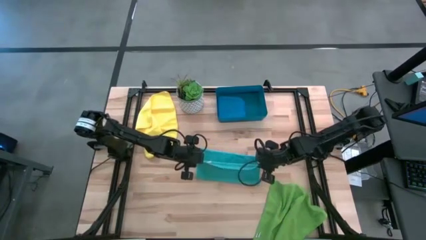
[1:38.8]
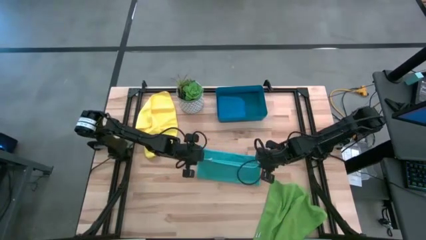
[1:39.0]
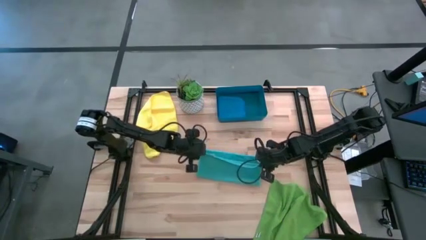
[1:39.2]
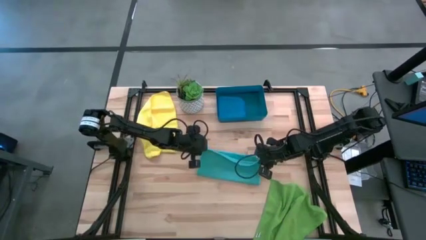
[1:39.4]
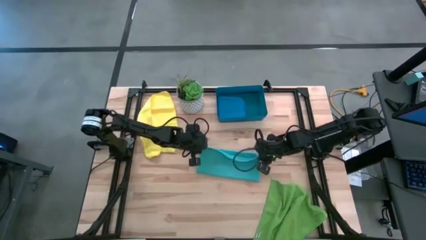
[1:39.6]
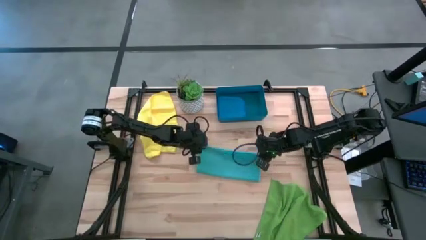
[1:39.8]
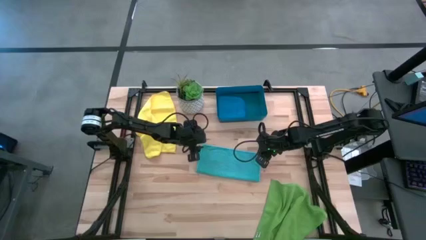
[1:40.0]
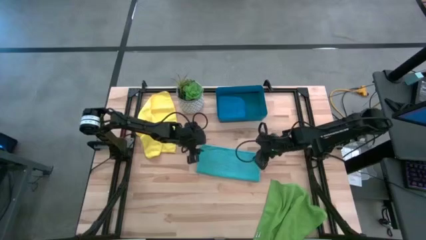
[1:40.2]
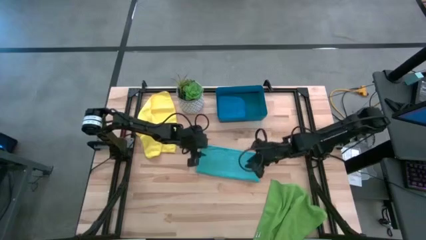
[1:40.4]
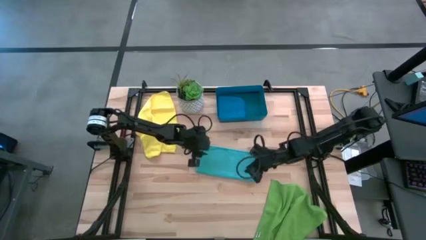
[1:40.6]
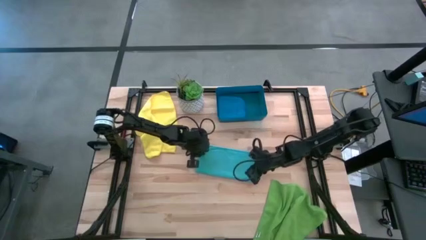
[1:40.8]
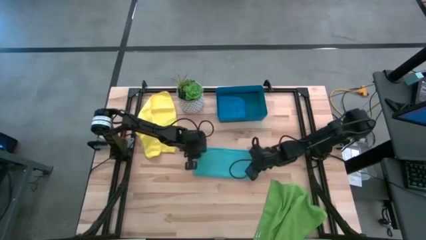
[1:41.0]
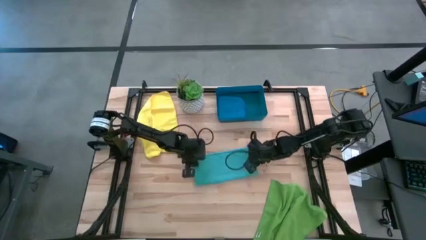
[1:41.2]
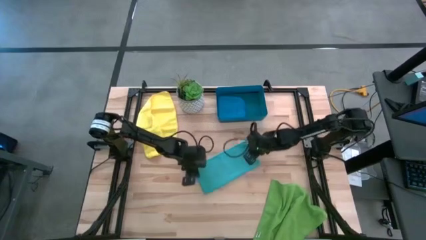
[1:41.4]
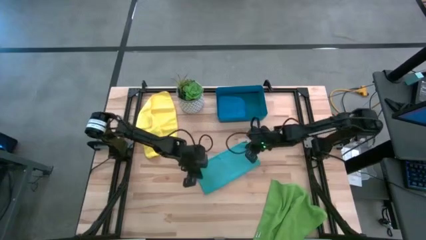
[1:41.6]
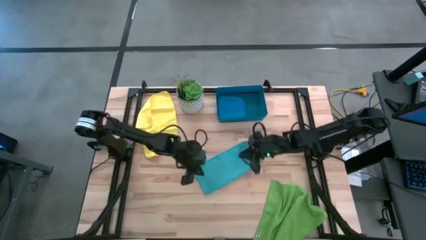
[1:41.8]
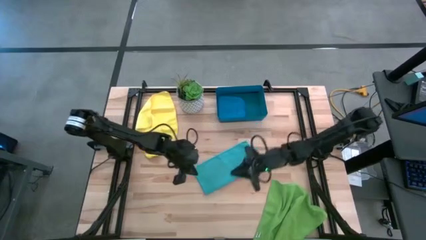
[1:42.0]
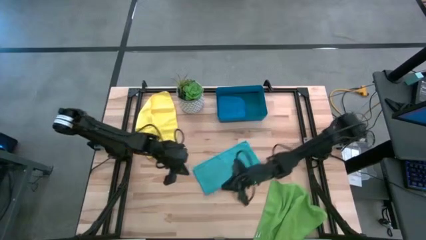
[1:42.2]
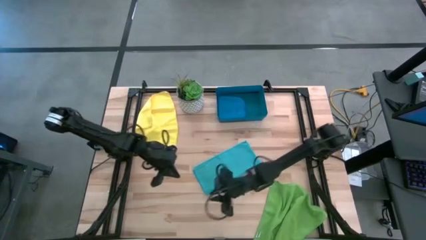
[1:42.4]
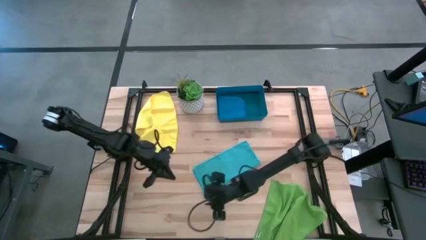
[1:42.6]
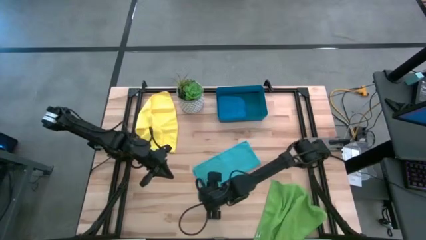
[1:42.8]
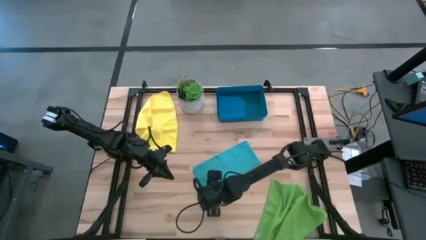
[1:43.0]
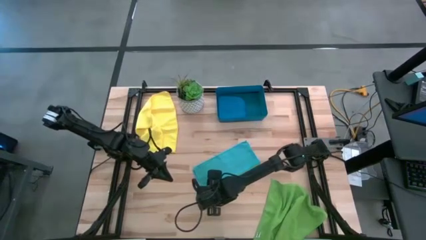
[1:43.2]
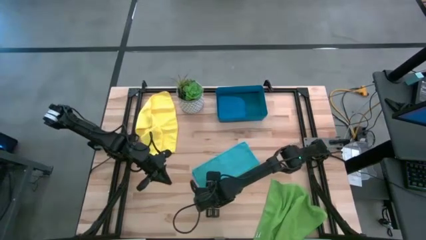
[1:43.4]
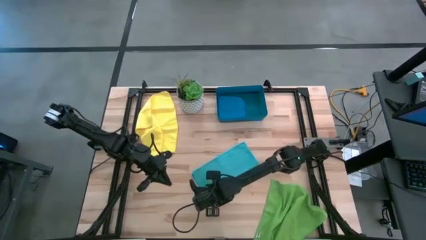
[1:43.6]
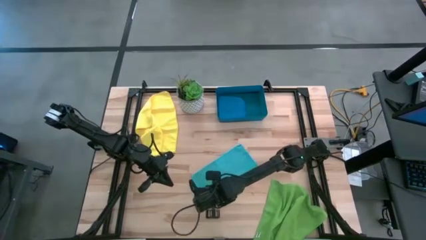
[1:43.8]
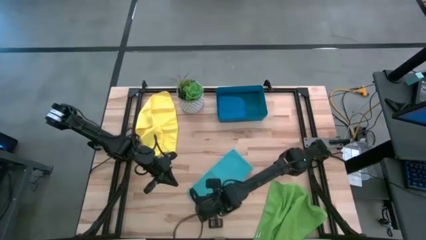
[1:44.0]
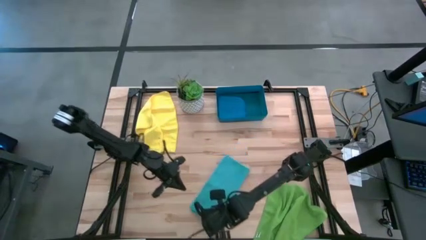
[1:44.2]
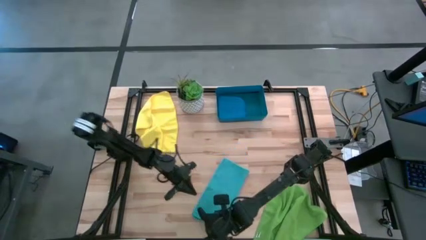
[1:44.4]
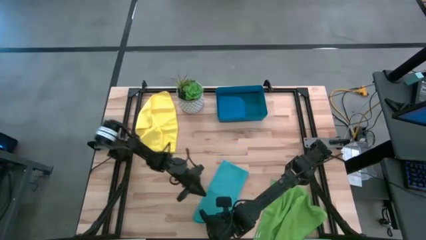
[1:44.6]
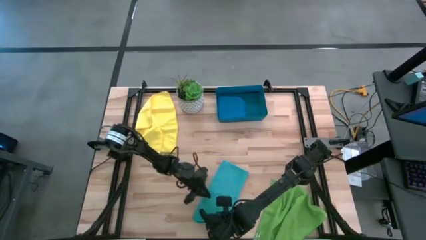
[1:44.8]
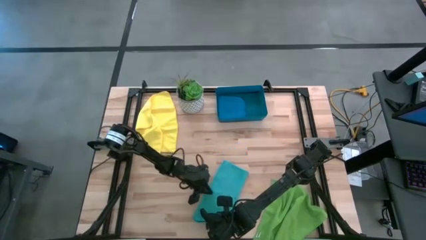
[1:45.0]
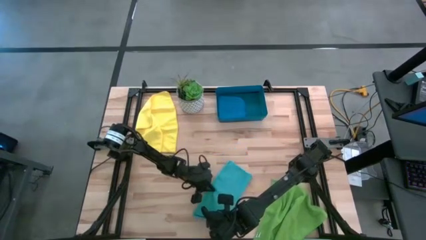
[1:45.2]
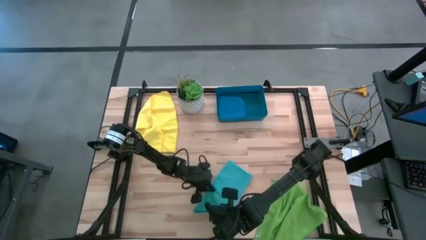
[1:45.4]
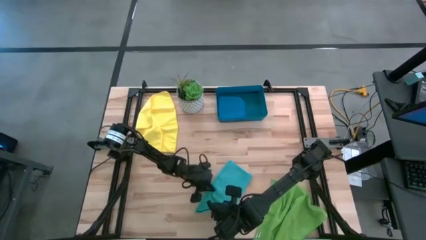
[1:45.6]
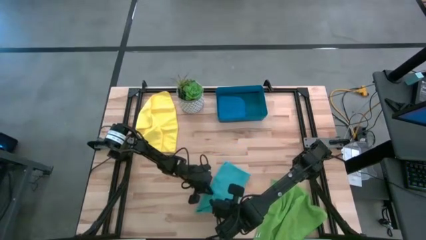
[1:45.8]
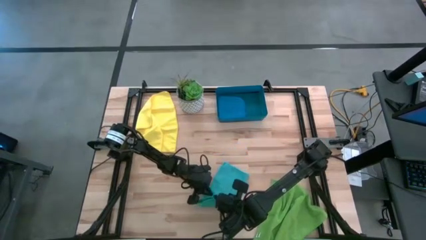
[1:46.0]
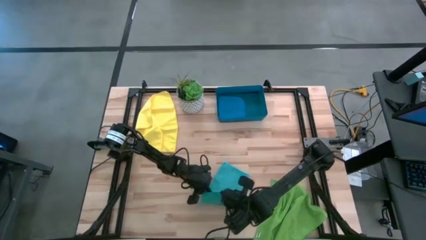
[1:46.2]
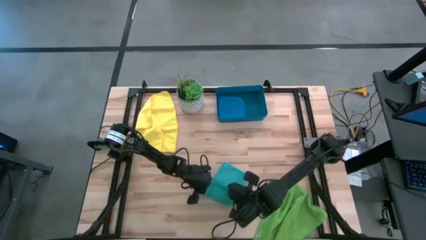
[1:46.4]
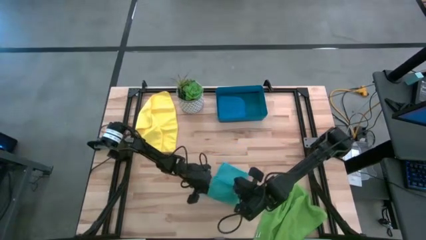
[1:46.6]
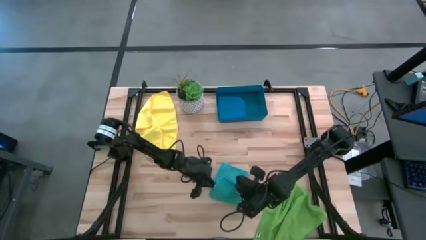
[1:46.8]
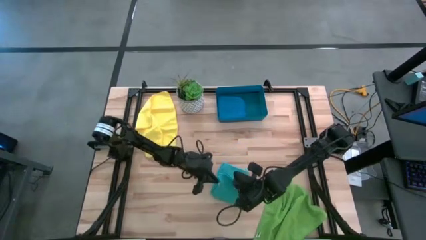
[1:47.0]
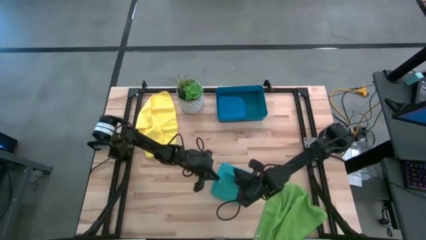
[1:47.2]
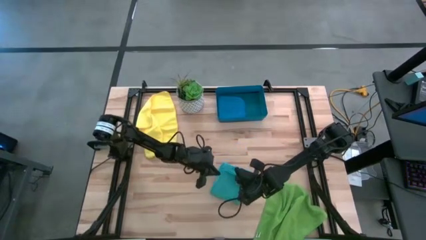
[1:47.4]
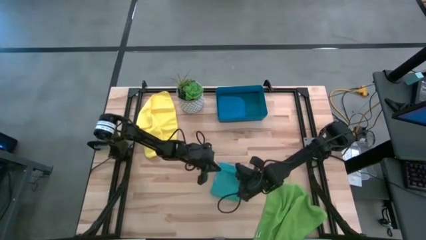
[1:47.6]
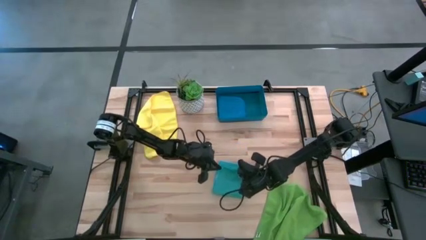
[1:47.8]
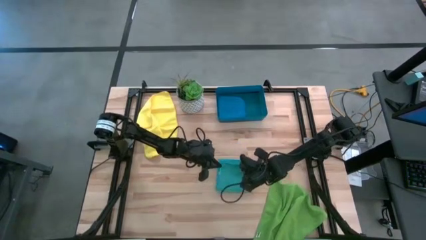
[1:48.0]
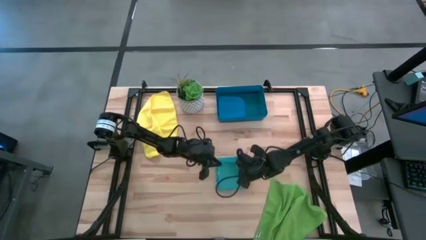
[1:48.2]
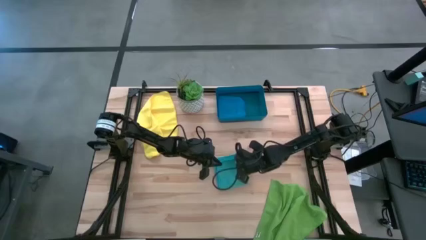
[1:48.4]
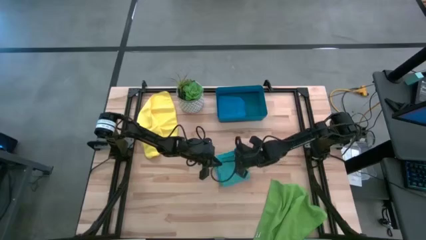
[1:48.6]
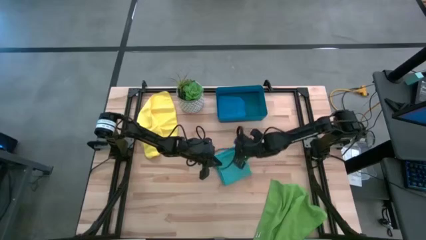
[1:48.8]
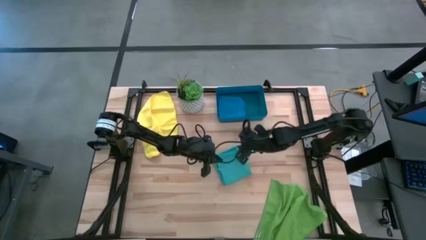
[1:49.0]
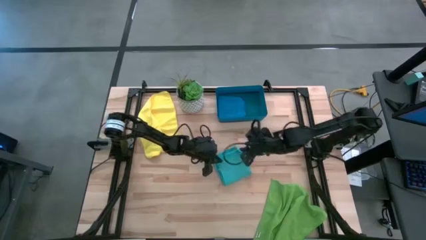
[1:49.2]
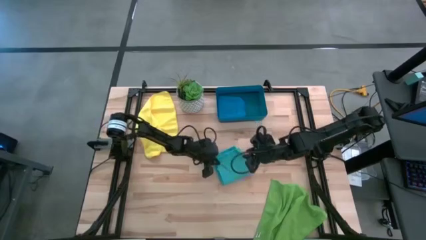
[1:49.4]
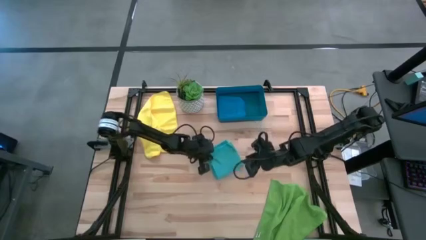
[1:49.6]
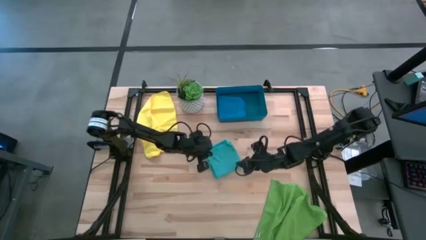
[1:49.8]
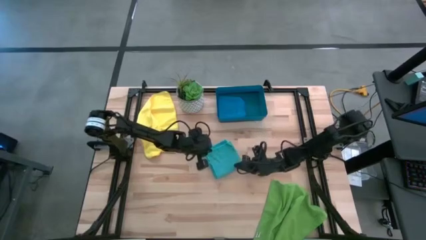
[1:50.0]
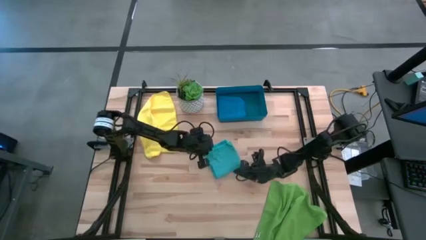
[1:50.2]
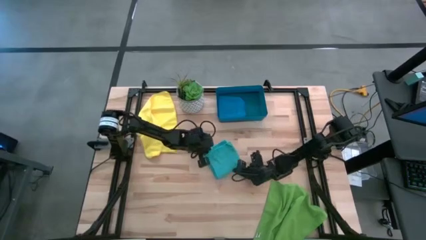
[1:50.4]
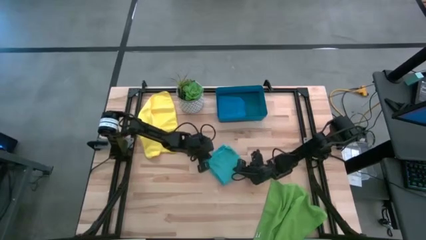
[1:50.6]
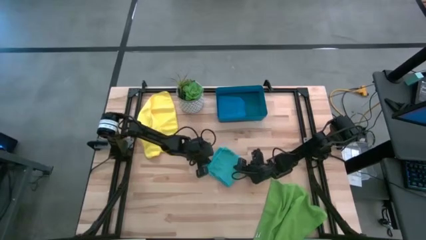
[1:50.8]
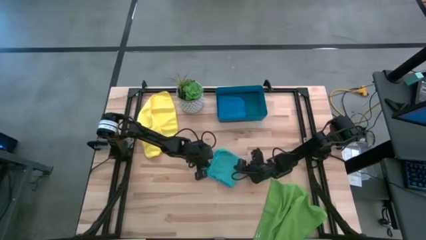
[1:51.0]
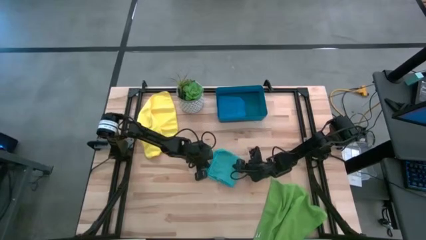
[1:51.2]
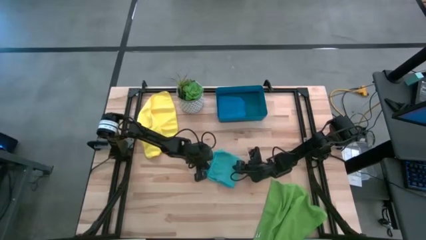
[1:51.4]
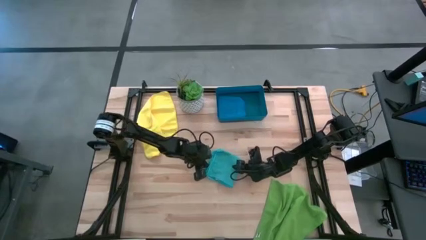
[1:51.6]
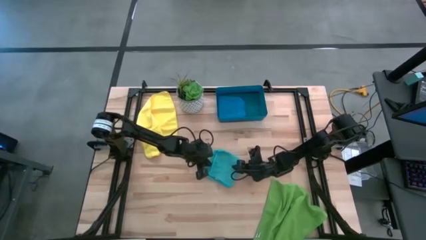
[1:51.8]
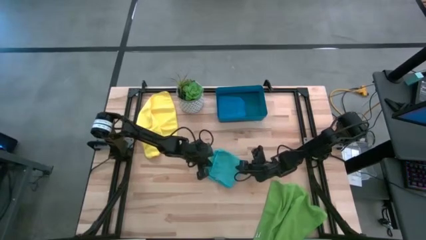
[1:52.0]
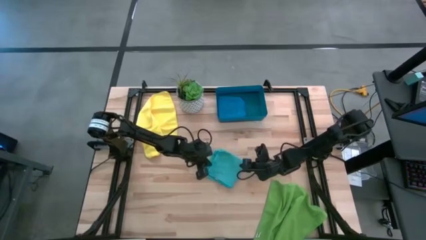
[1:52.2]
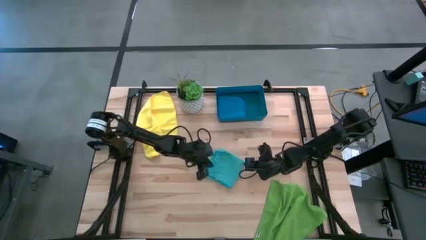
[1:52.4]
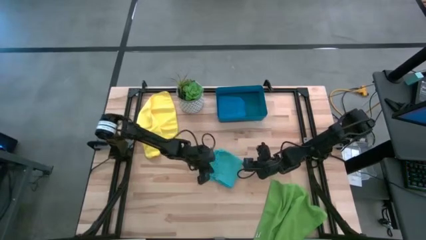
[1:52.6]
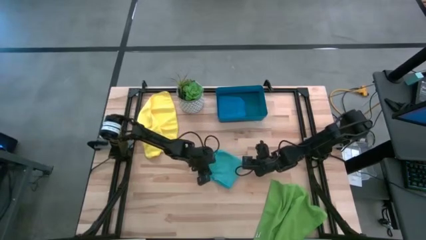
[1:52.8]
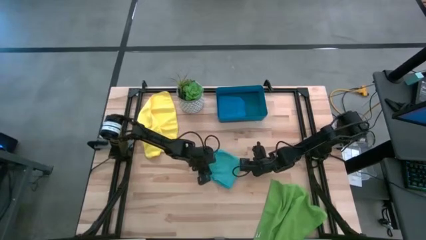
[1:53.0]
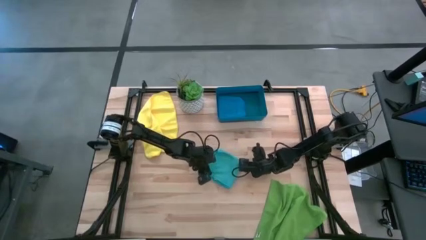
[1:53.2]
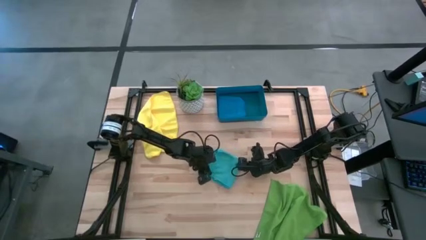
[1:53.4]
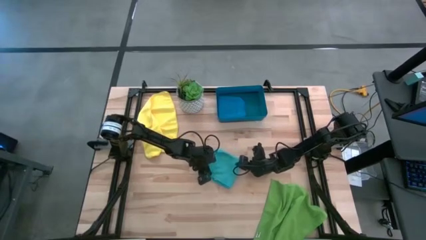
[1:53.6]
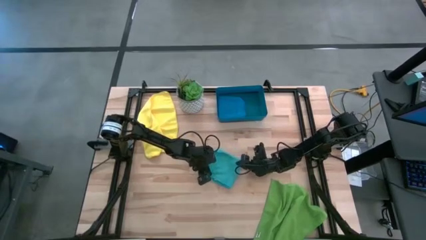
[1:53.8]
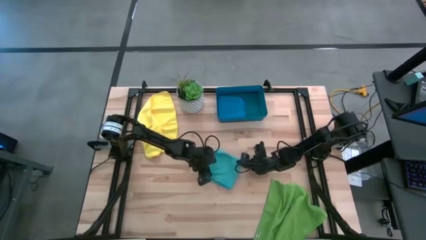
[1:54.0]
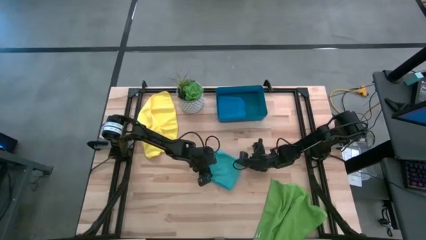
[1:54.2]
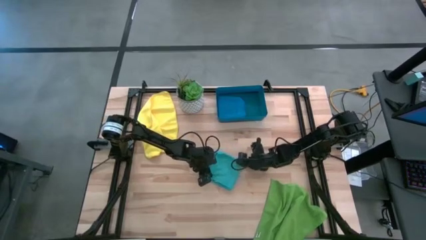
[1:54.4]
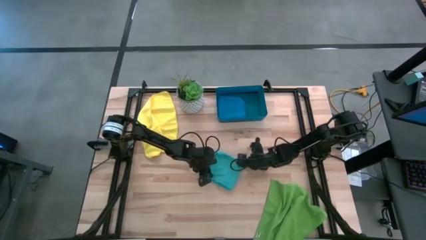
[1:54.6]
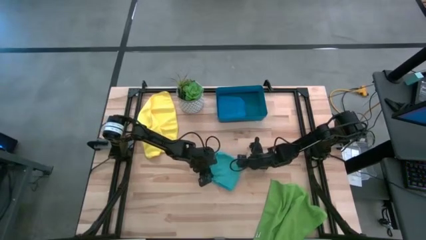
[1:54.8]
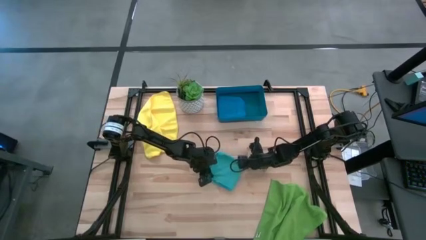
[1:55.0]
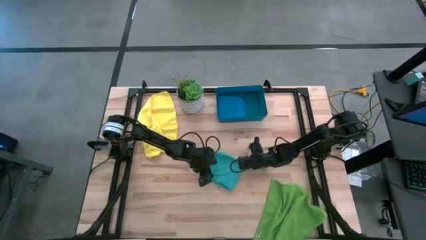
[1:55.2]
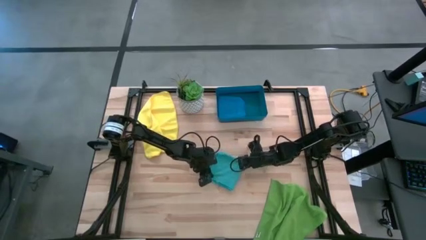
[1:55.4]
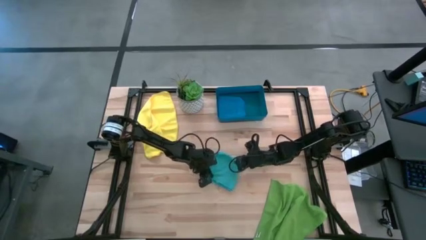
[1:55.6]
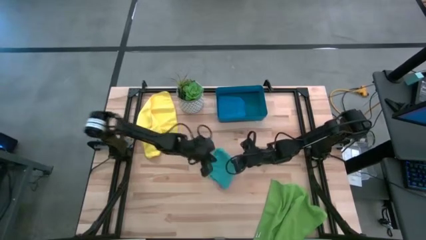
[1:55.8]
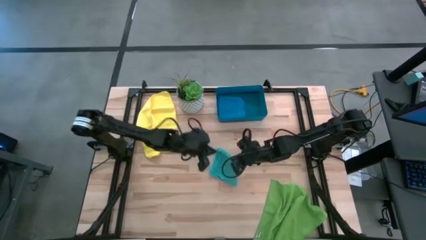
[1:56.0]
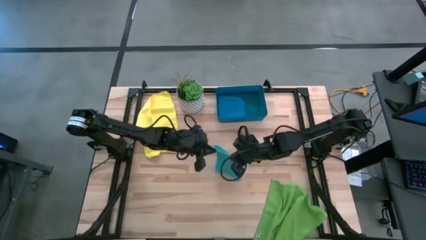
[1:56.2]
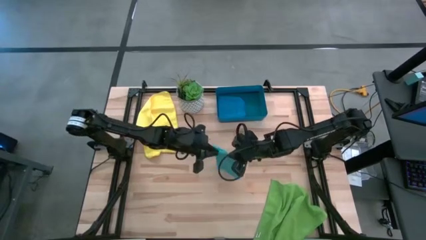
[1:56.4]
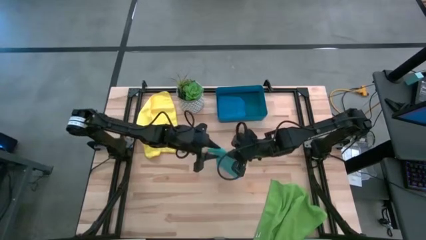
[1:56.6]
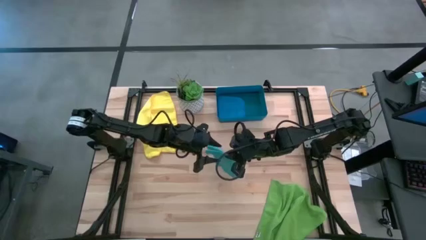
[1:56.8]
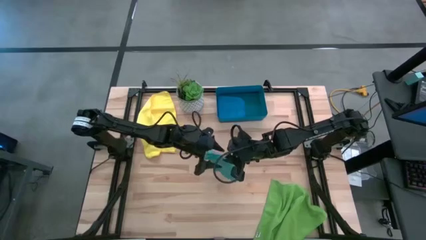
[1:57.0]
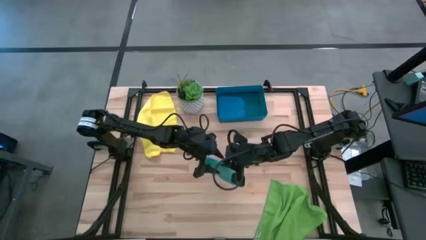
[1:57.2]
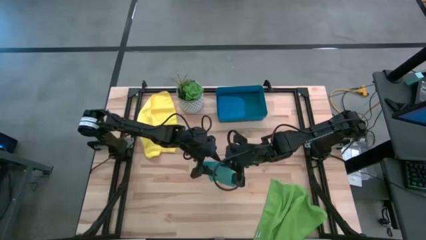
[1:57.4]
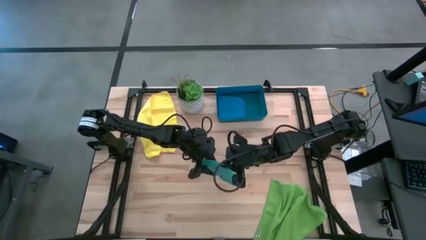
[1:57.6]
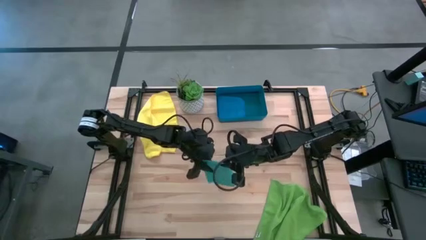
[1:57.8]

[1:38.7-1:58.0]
Task: Fold microfiber towels
Fold the light blue microfiber towel on top of the dark blue microfiber towel into the dark blue bin
